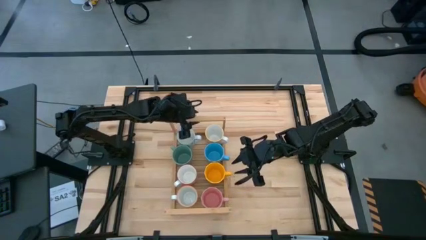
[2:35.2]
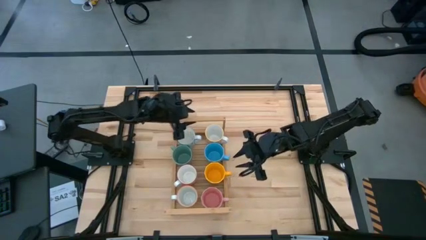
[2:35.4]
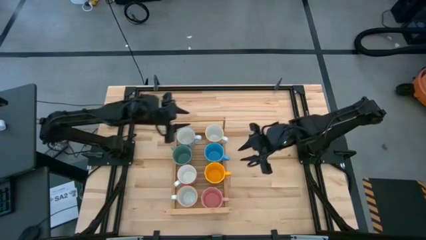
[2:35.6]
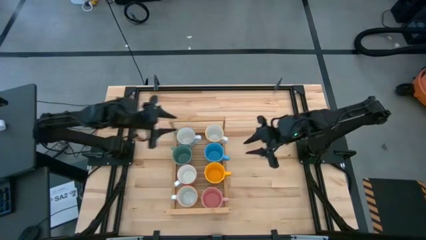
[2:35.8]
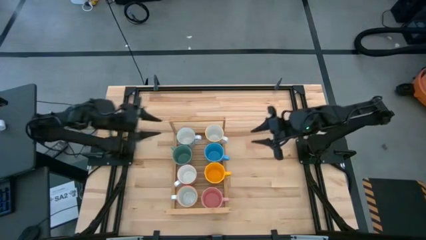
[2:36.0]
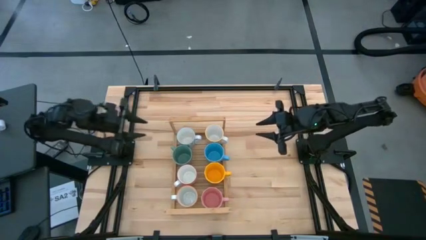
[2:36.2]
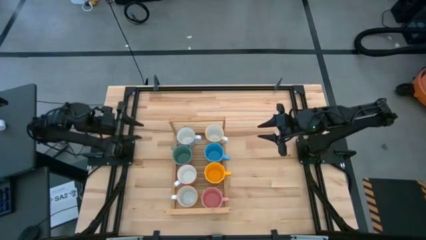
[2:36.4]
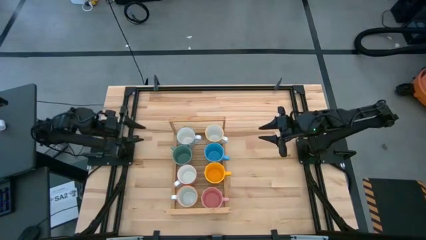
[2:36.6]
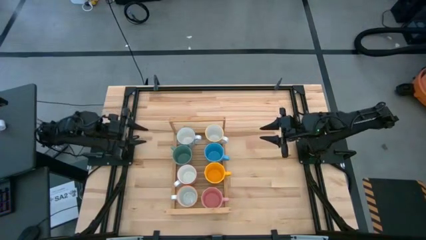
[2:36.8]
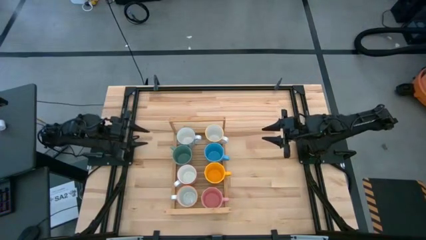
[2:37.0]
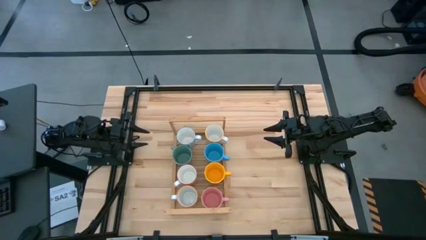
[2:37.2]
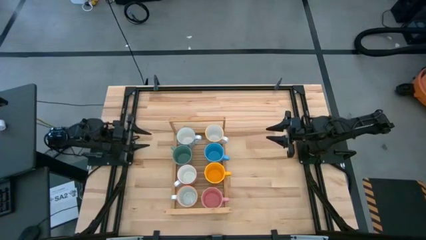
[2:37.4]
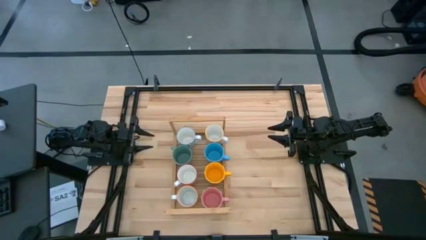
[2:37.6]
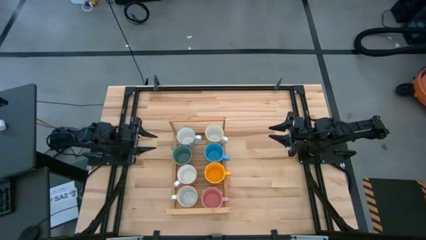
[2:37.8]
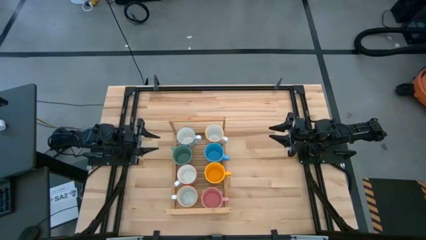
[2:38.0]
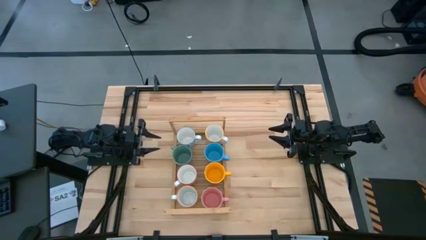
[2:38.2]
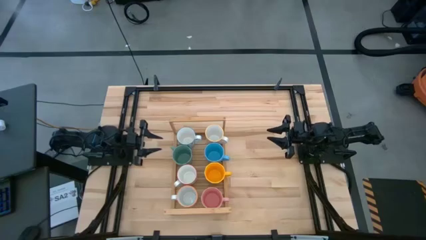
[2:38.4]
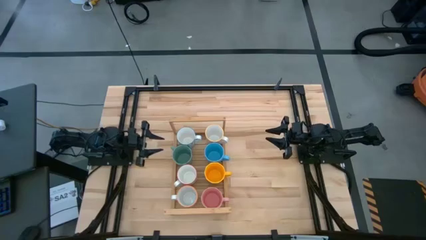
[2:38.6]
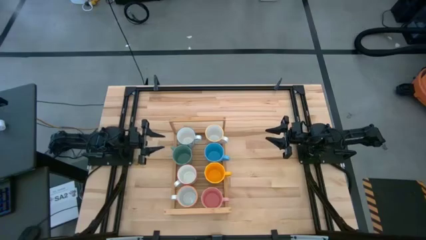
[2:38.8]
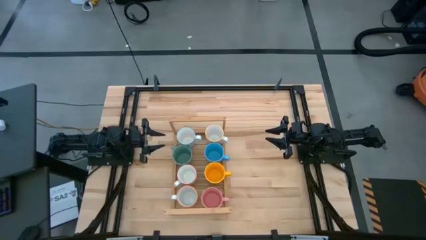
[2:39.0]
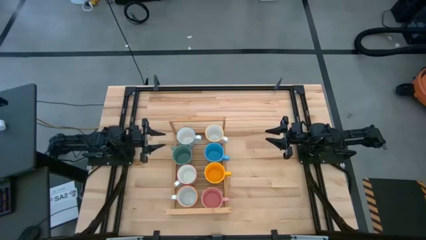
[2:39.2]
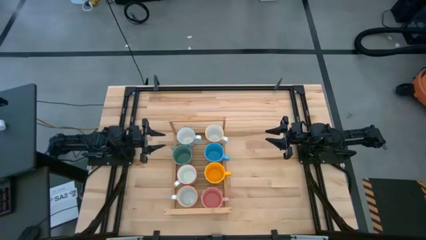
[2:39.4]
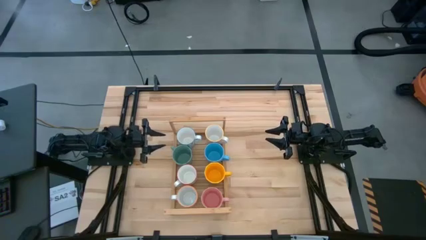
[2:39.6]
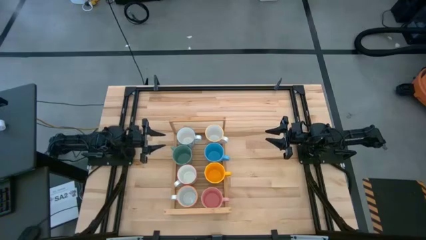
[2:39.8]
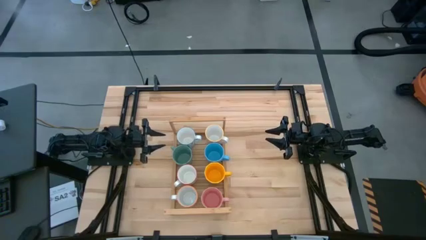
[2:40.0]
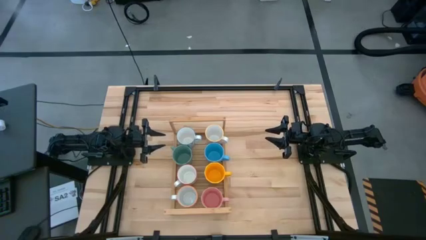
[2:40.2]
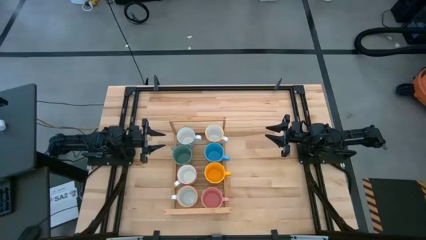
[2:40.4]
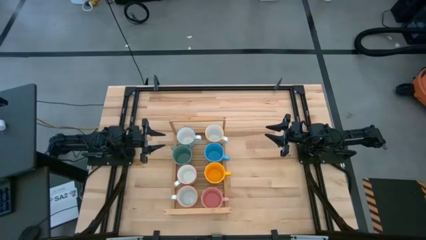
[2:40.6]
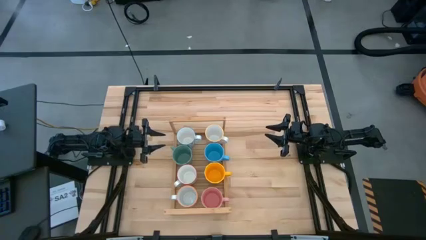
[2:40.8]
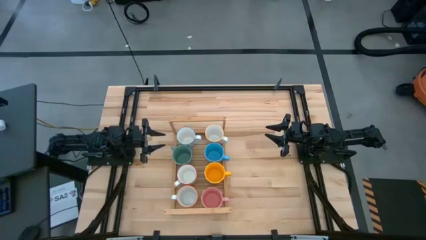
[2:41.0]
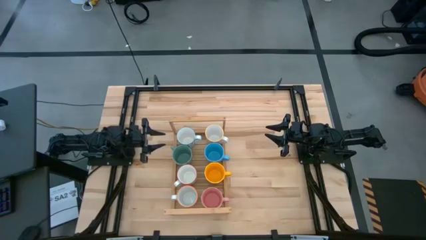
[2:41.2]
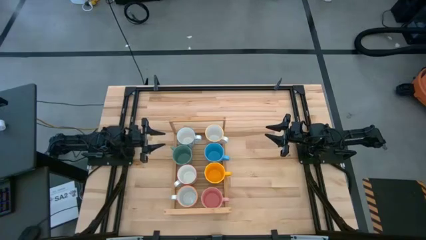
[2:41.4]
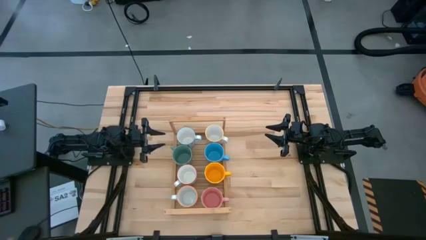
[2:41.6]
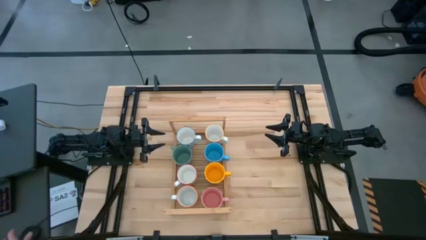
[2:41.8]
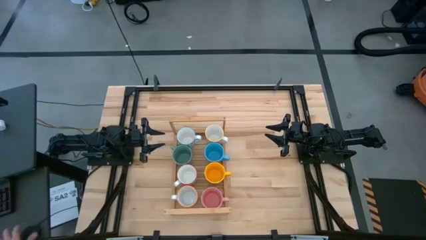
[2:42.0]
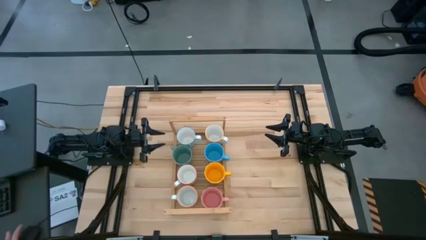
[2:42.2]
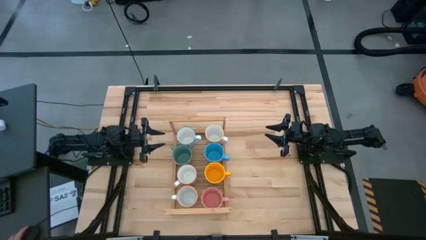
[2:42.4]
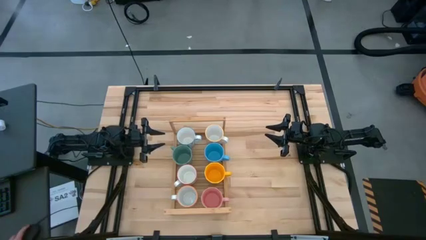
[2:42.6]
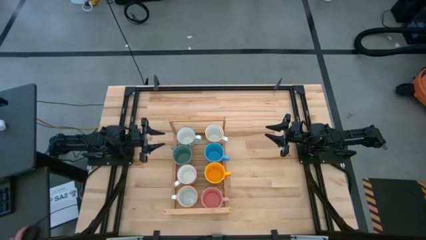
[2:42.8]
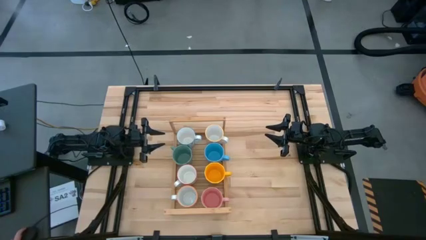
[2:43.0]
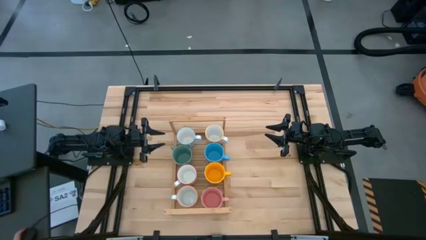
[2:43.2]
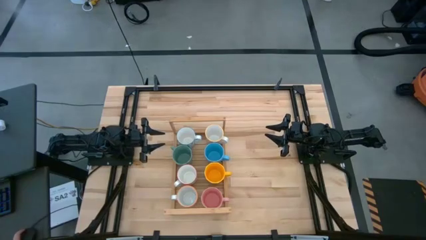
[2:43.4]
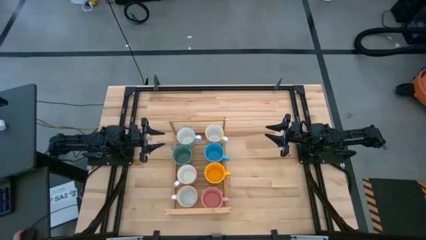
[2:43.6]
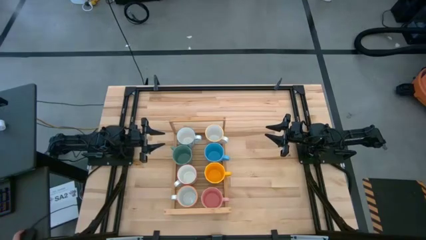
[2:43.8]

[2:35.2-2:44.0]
Task: Place coffee mugs
Return to Home Position

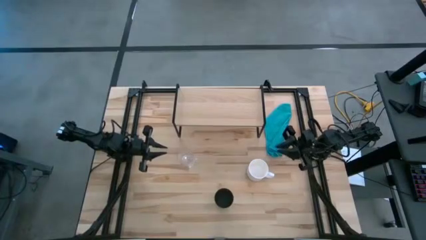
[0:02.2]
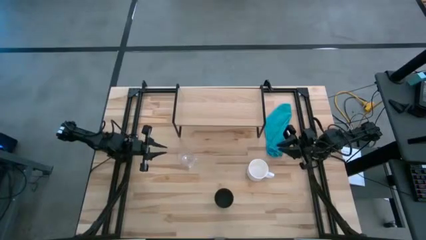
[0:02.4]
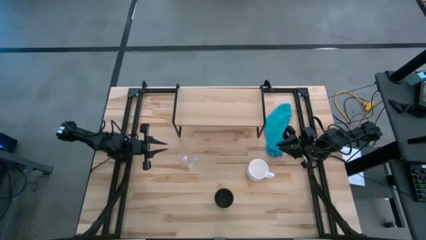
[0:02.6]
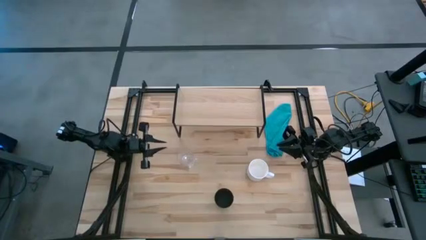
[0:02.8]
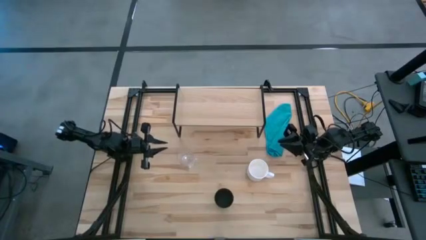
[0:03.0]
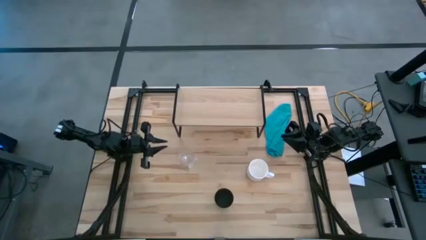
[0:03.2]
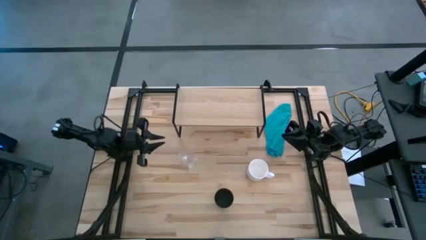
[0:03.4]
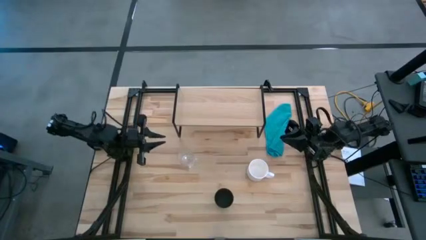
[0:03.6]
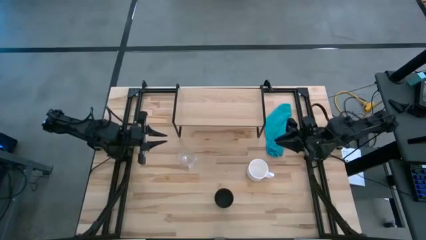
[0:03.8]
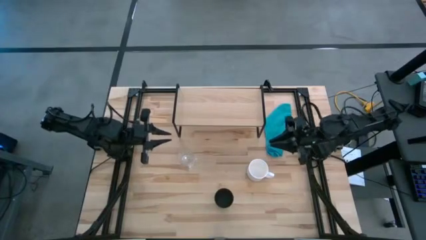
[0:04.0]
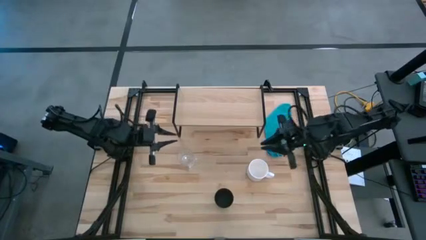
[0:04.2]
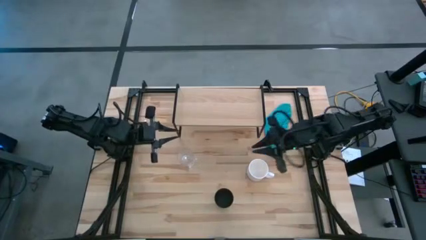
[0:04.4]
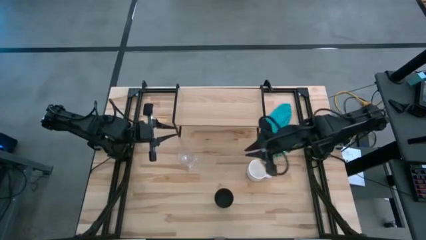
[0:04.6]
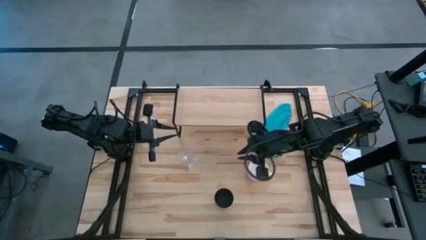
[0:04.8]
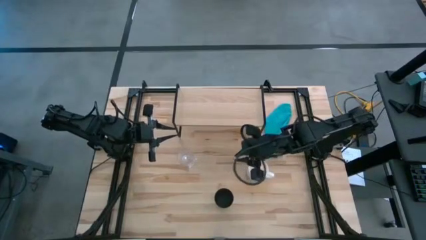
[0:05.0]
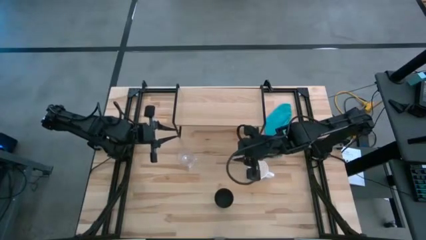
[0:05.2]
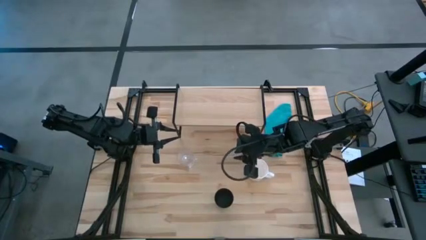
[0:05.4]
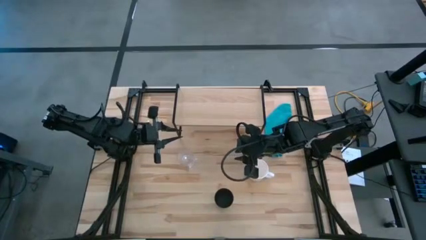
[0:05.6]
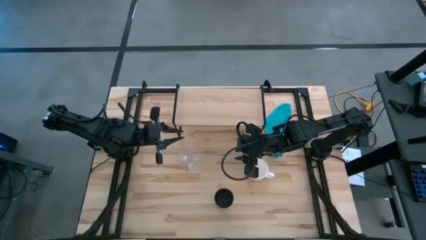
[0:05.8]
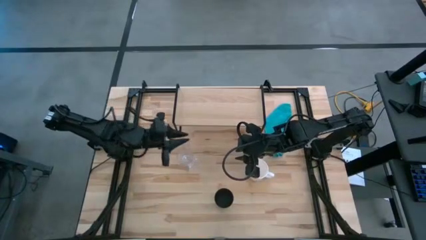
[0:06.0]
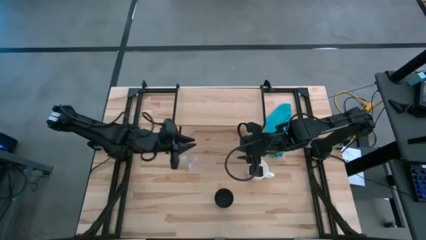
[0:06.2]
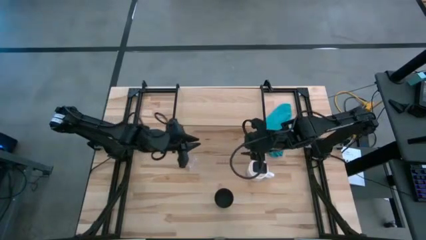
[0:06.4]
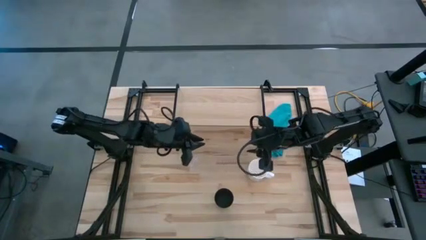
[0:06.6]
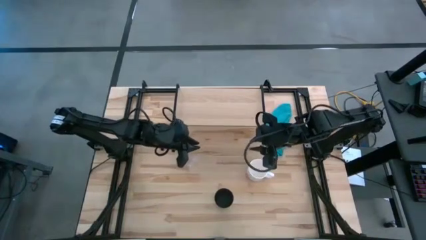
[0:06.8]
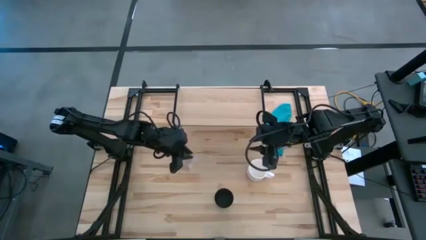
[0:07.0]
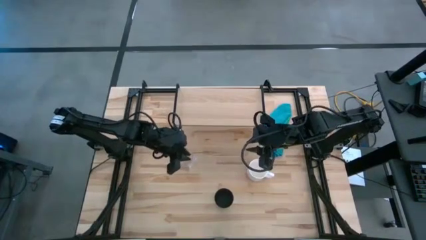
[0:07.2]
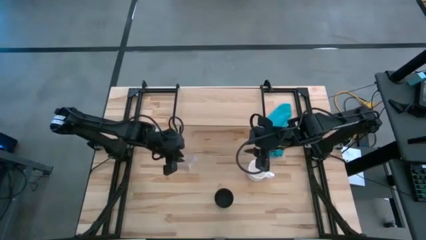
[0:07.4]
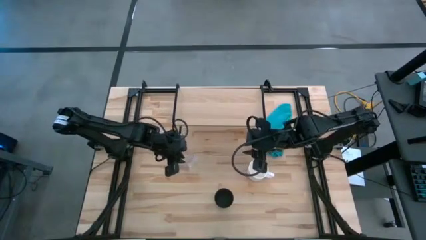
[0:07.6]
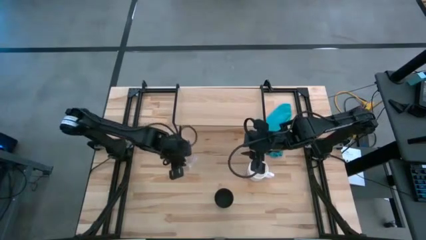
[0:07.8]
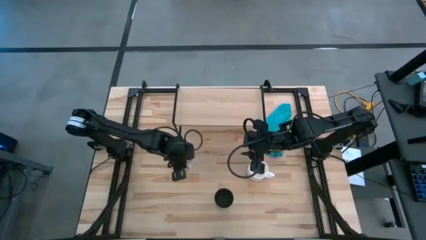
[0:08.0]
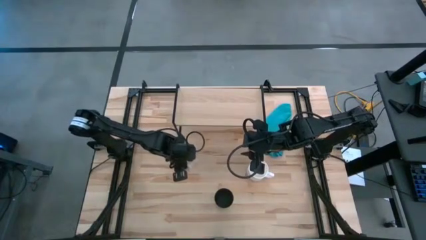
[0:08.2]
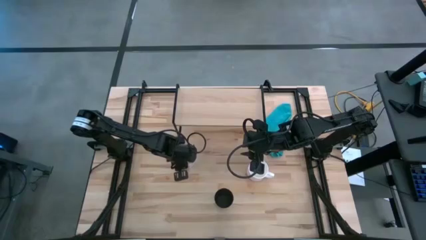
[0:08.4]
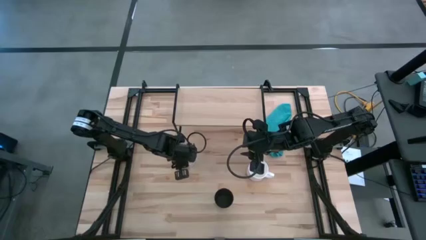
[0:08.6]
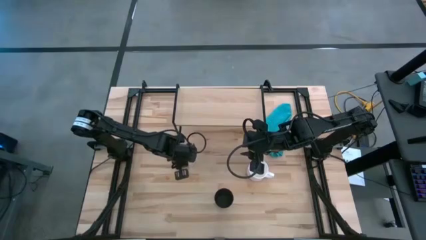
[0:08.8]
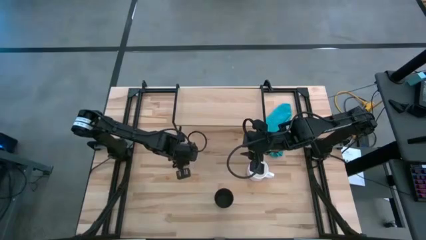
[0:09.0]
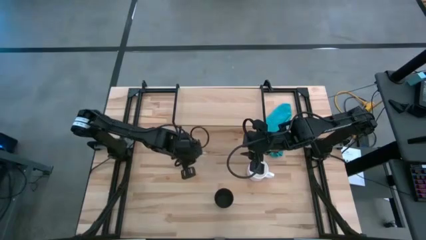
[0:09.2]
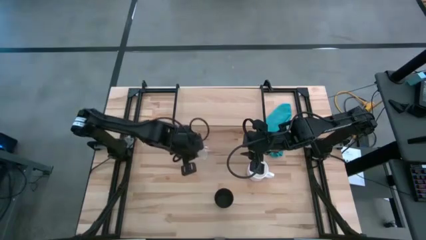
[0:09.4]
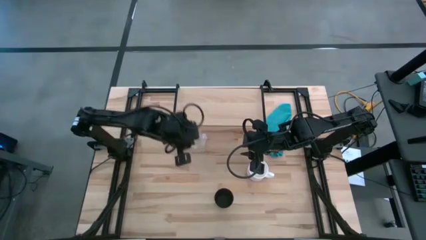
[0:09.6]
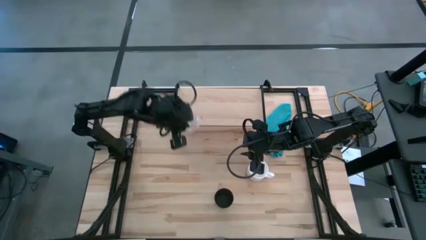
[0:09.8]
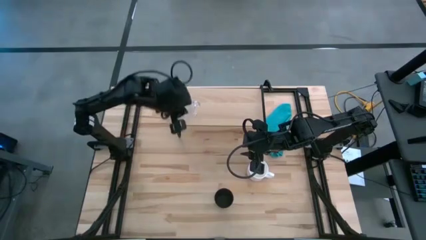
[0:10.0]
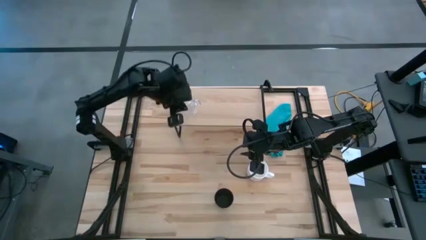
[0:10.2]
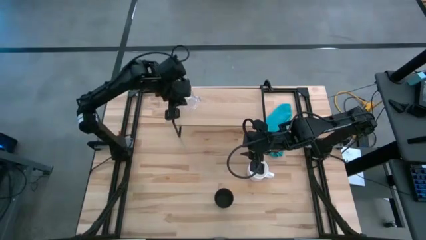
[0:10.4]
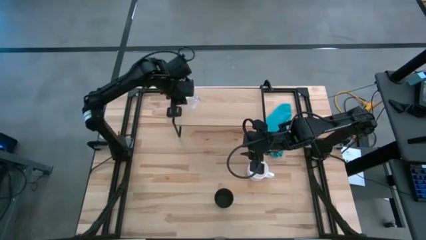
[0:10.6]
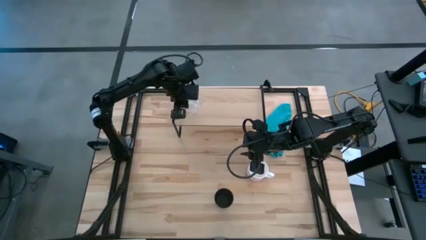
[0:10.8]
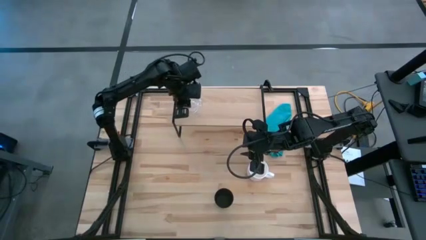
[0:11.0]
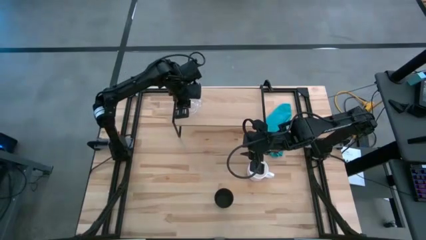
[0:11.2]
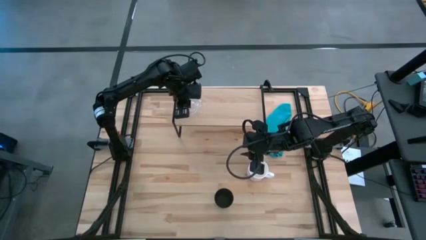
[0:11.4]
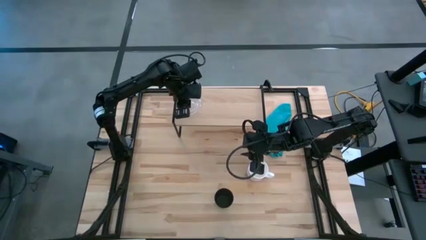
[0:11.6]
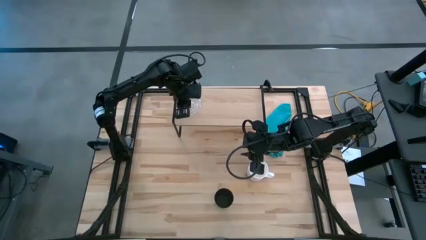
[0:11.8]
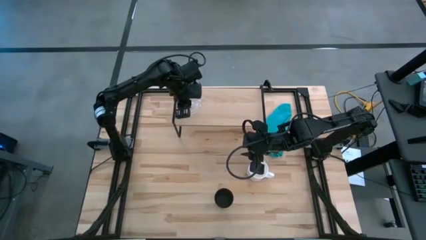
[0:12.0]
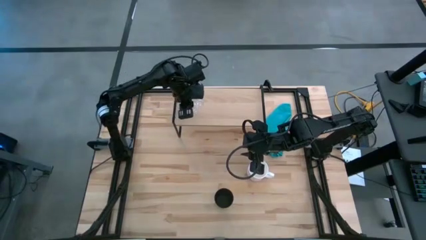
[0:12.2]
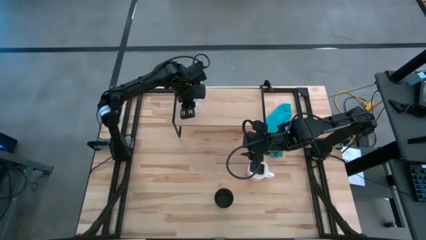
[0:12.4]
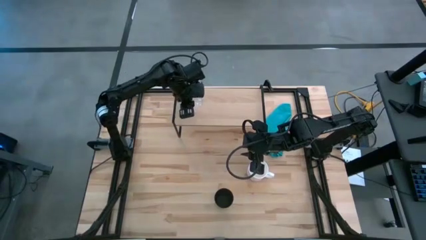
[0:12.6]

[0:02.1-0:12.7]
Task: Stack small to large cups/mugs on shelf
Put the transparent mug on the shelf
